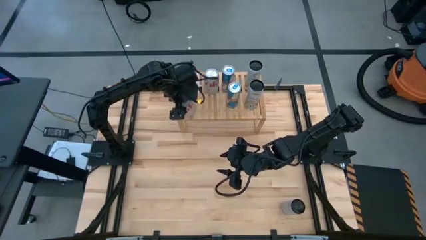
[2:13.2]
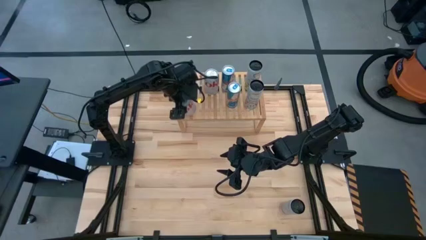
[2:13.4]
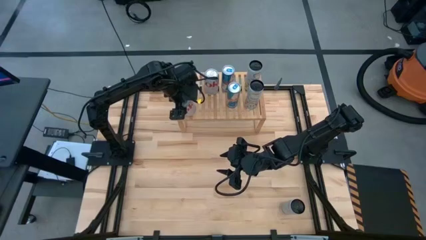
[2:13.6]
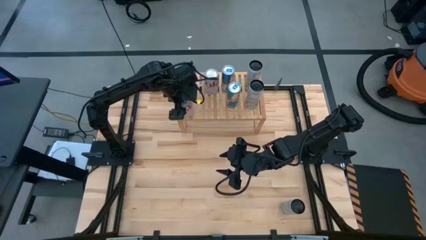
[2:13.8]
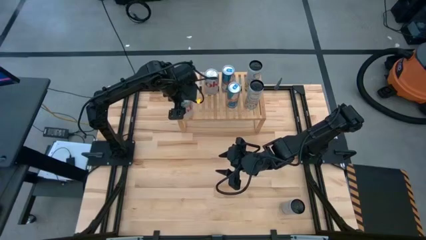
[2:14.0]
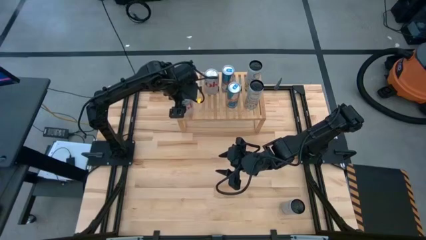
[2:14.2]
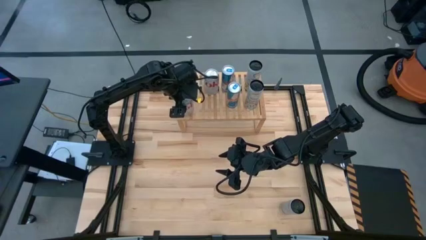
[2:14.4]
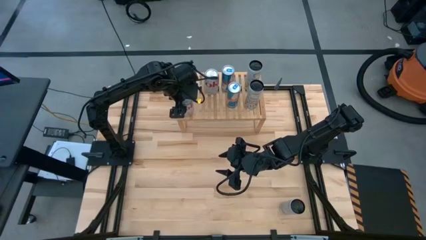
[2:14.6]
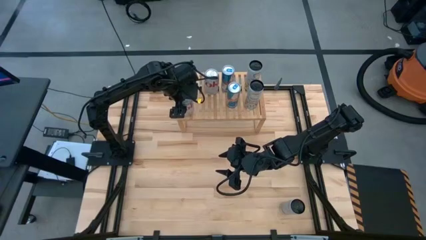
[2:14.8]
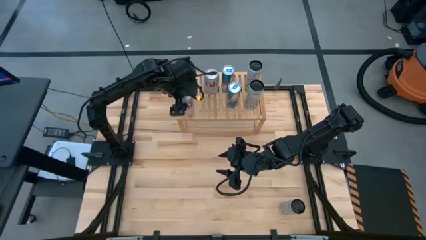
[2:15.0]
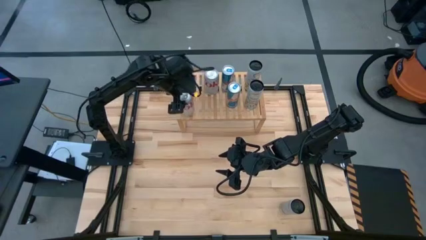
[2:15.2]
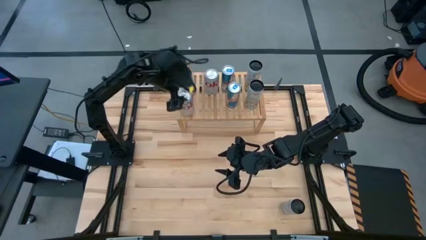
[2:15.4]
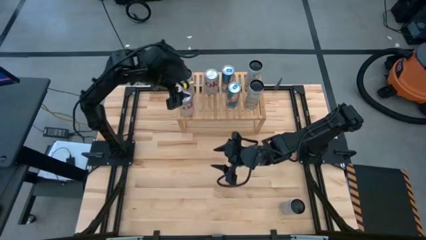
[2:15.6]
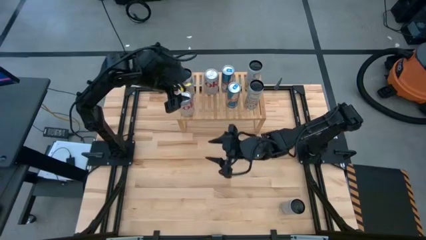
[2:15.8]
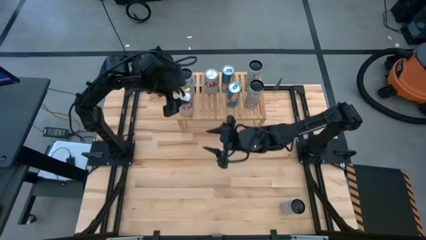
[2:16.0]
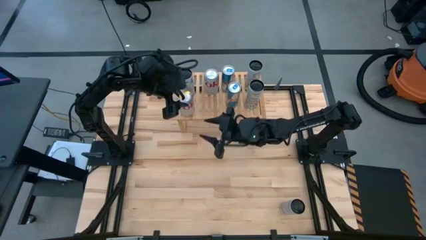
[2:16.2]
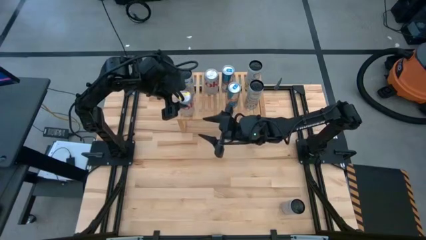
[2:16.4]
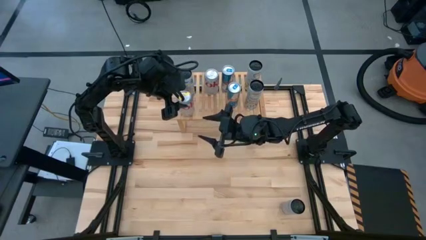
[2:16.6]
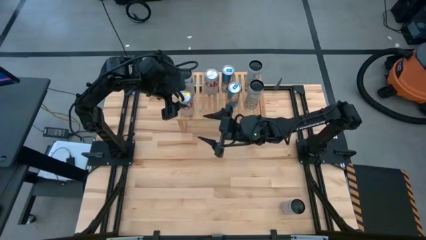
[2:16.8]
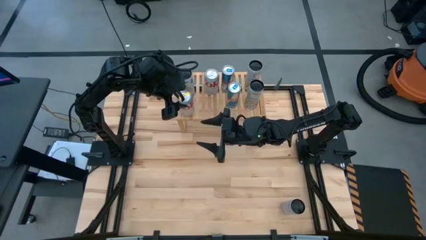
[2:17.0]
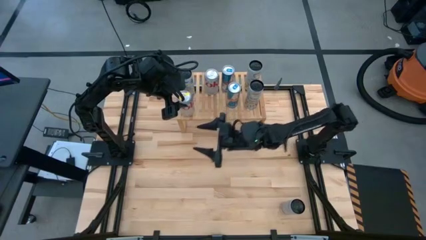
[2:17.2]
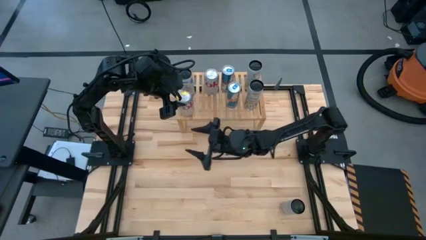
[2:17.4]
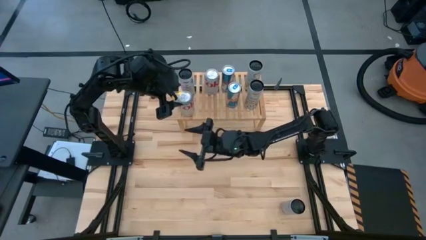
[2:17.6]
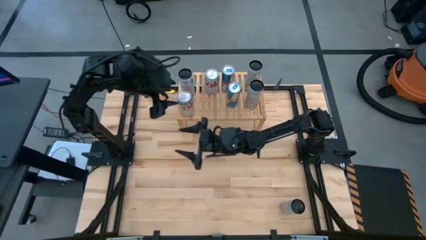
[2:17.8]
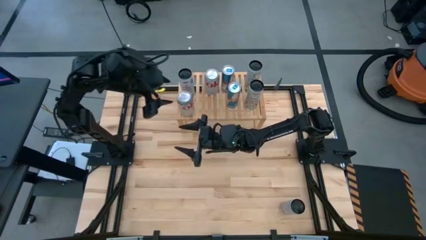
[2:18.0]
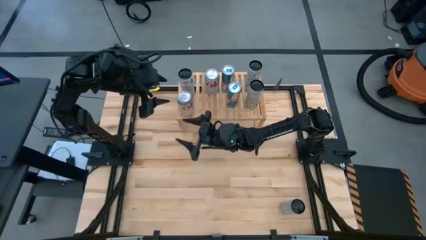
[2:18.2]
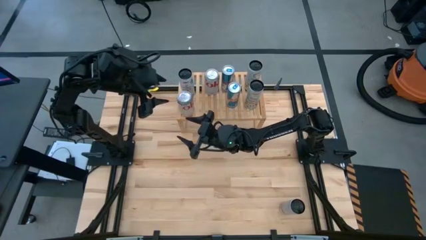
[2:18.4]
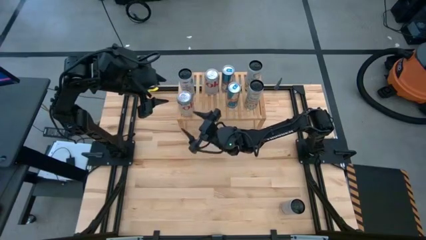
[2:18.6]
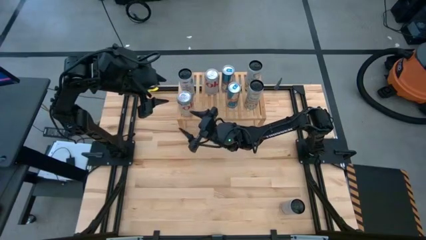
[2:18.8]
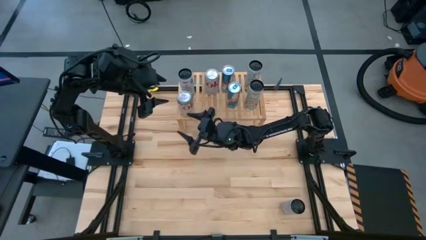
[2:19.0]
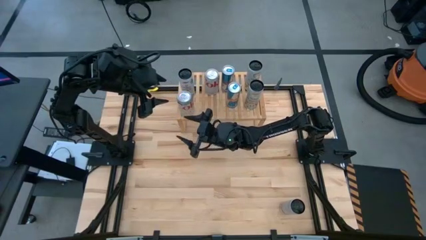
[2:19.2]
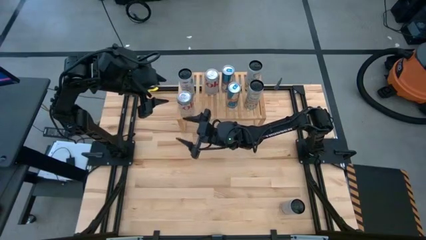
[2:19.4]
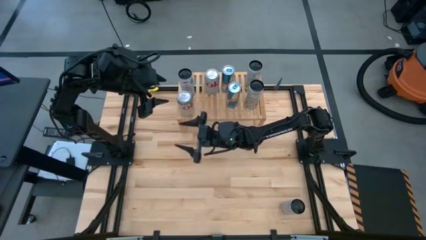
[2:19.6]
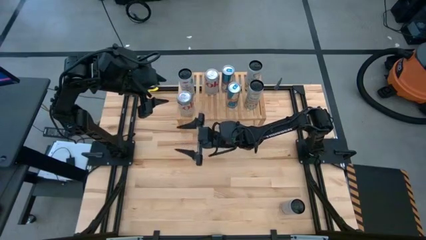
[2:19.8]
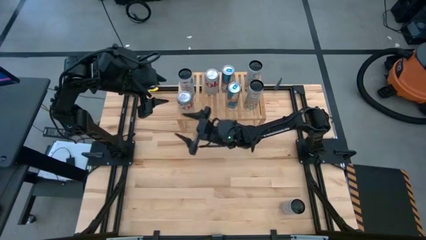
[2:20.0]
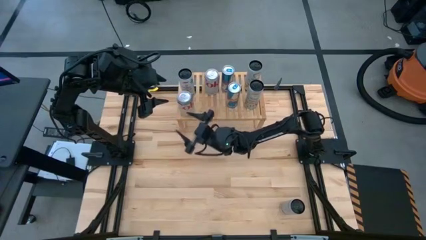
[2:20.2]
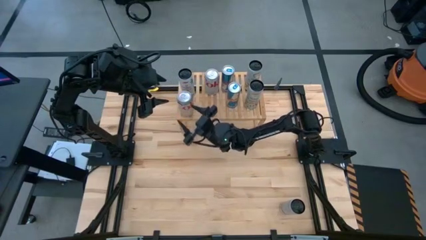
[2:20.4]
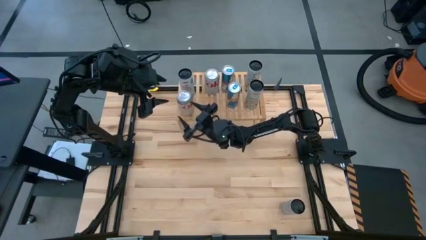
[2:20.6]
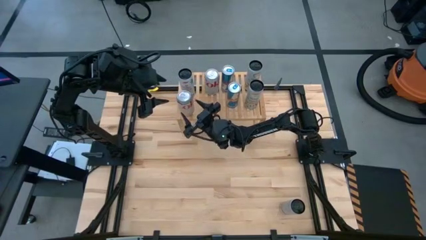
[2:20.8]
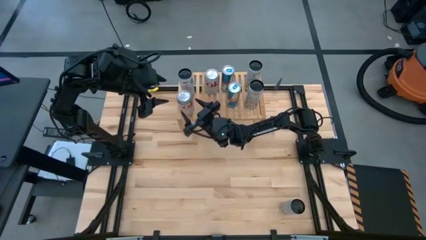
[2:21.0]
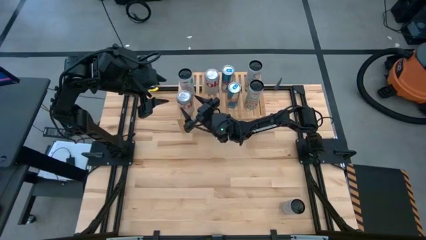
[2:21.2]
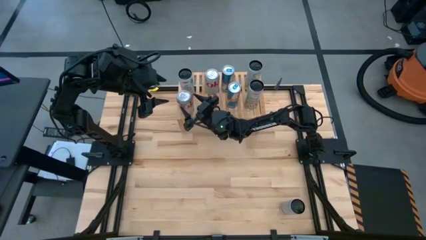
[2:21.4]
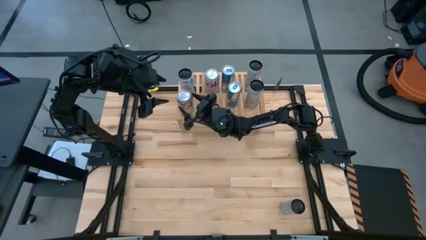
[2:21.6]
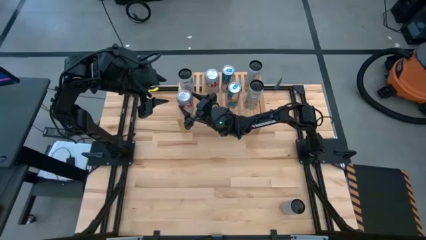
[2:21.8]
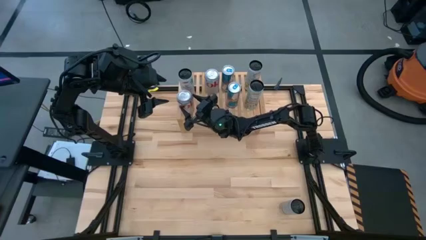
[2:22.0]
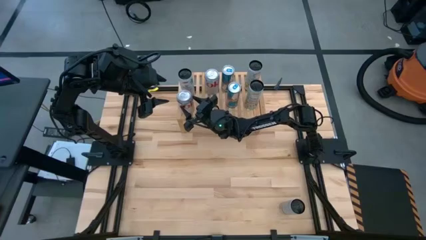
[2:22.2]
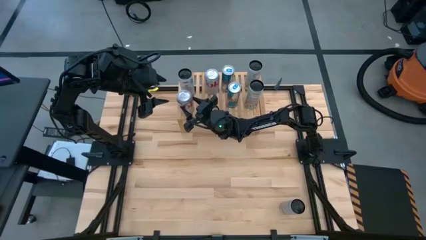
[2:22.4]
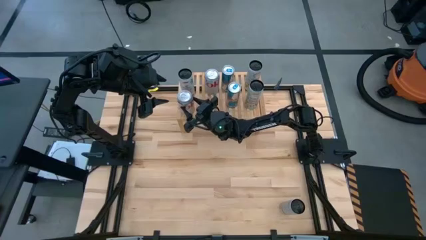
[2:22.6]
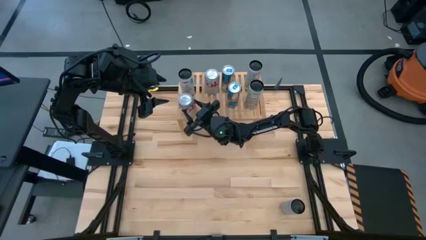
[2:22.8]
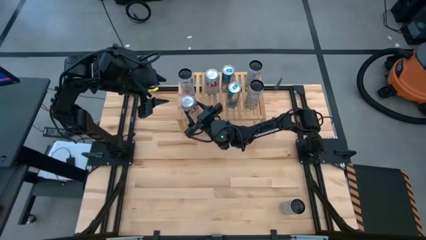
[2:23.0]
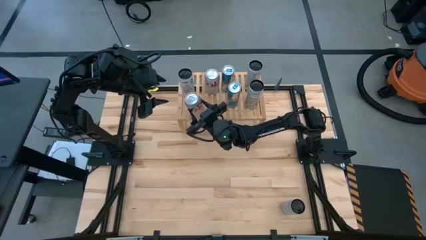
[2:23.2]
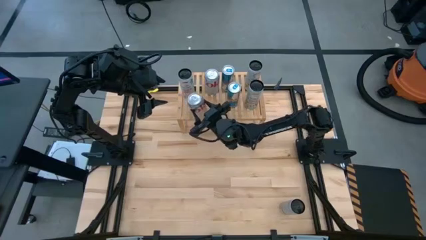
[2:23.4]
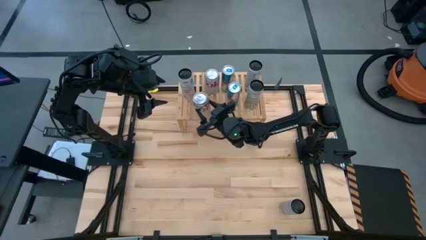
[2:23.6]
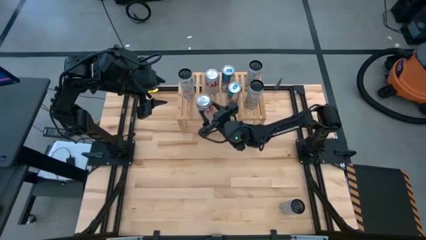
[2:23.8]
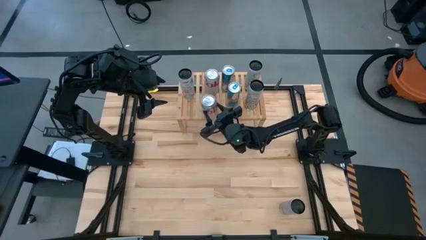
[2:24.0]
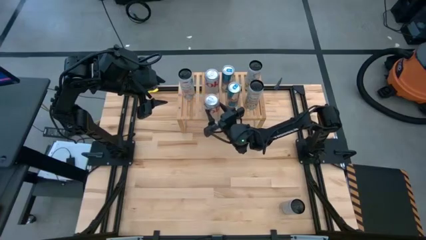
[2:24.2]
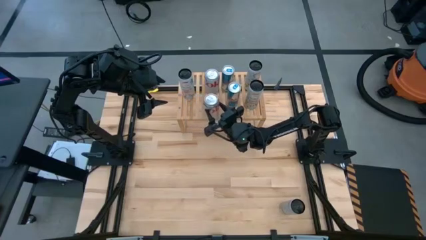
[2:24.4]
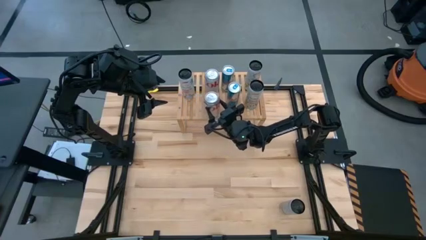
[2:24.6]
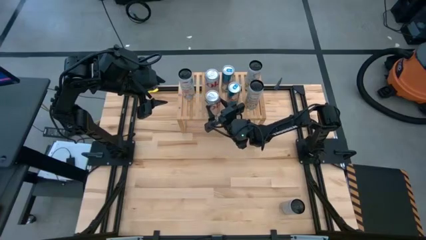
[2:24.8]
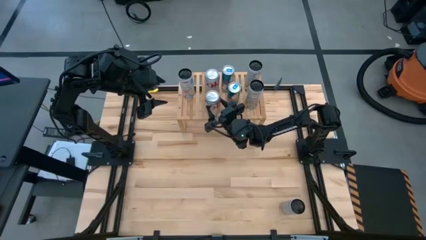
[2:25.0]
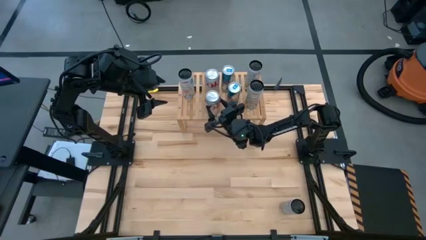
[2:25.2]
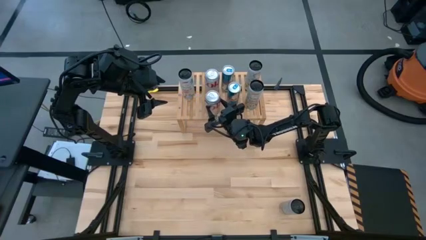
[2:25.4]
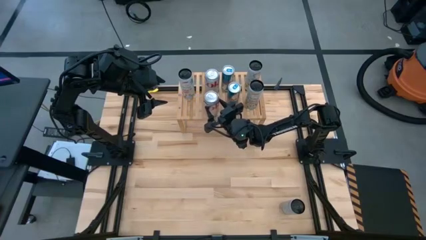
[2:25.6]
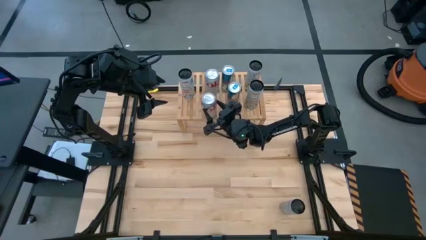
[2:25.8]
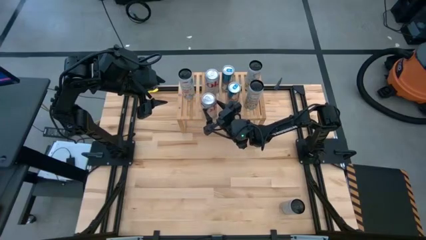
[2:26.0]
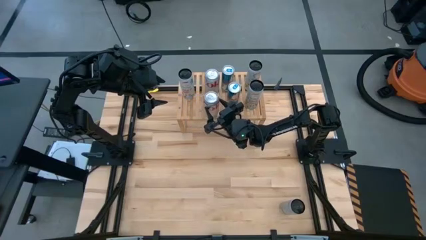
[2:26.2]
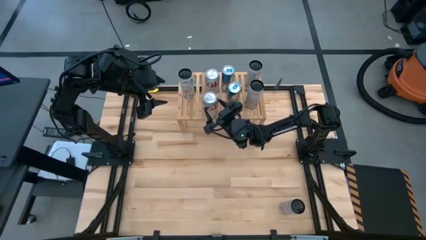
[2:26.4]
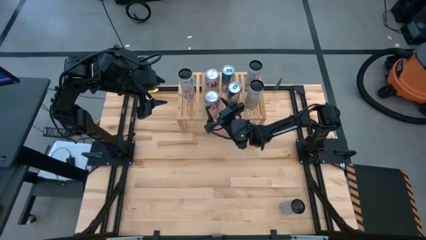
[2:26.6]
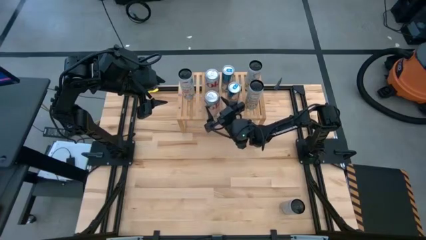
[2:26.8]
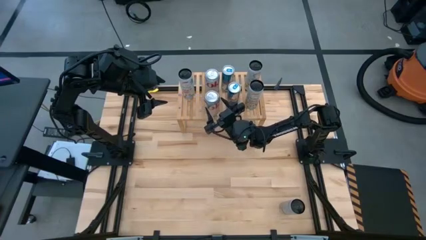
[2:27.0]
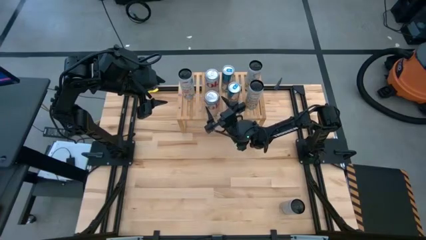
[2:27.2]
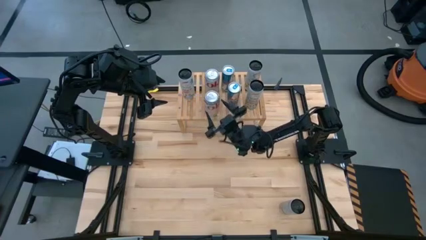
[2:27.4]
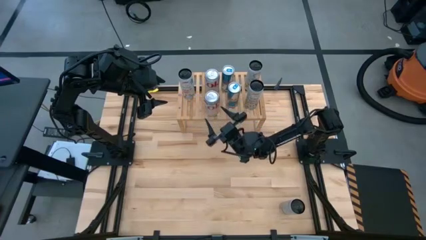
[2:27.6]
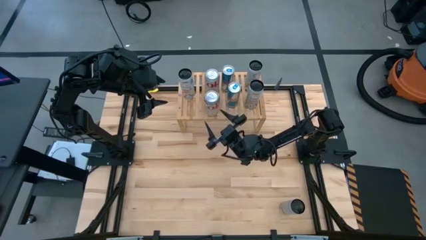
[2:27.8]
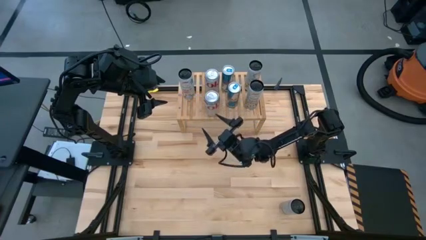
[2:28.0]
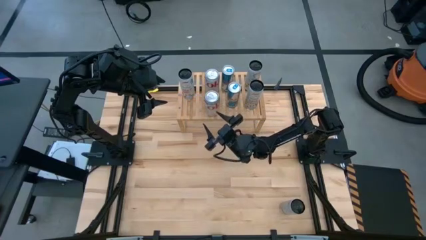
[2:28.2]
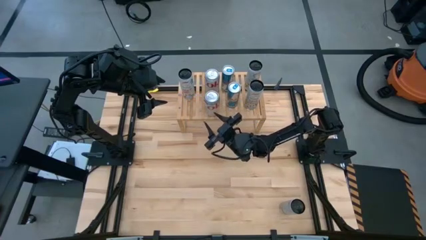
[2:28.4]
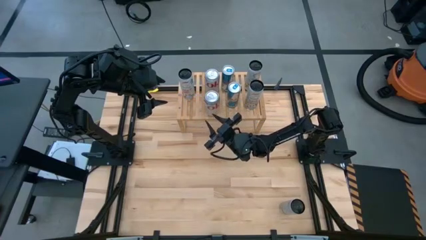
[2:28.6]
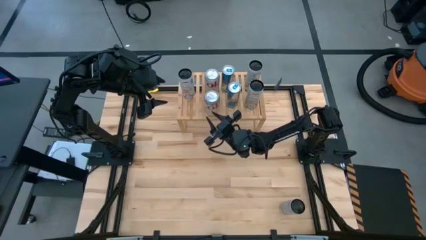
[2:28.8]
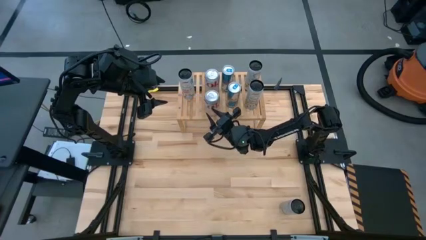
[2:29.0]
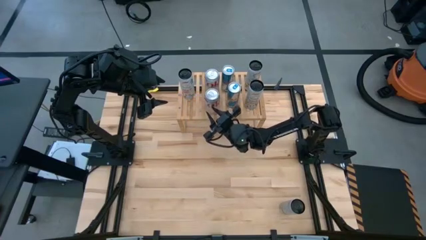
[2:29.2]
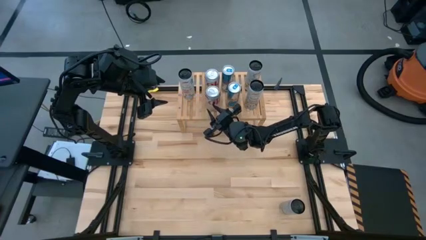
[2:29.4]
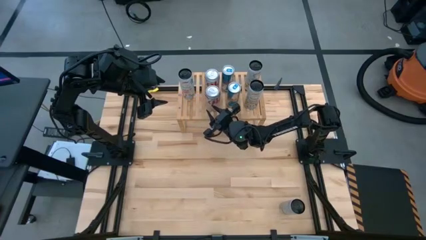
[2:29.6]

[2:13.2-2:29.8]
Task: Place canned beverage on shelf
Put the silver soda can on the shelf aligned with the other silver soda can
